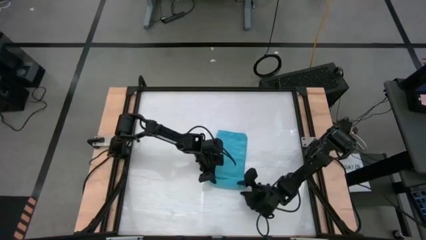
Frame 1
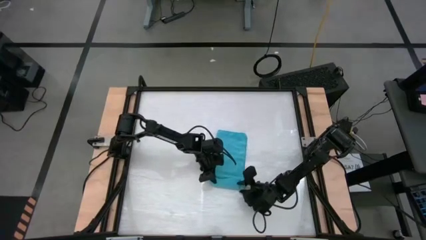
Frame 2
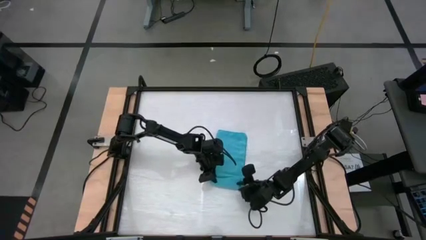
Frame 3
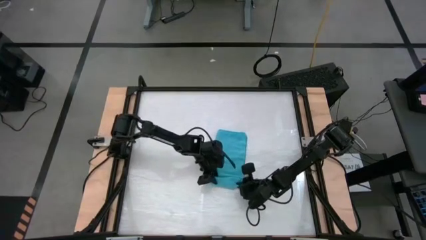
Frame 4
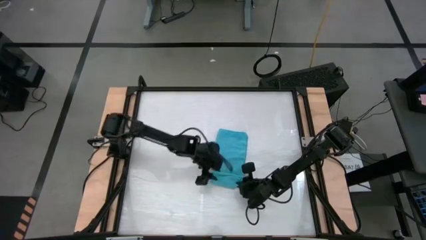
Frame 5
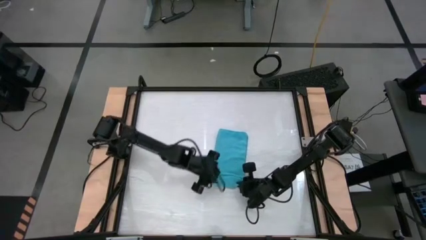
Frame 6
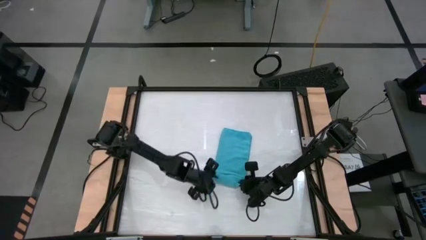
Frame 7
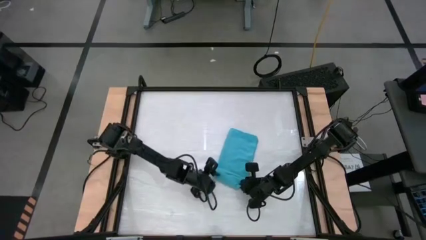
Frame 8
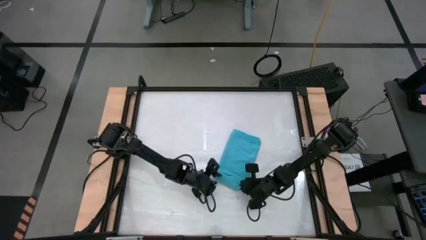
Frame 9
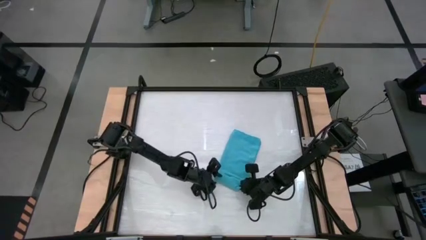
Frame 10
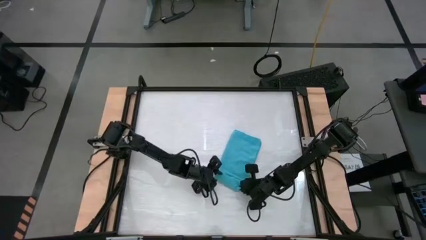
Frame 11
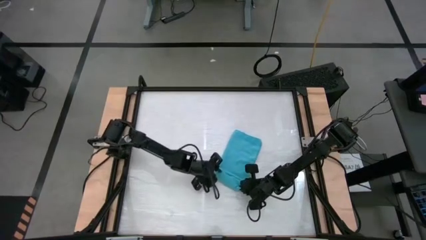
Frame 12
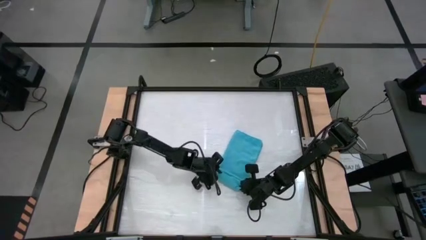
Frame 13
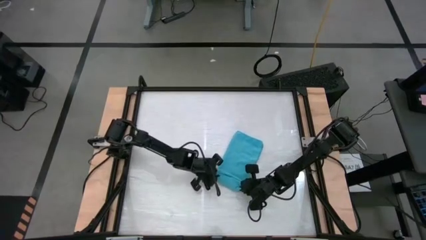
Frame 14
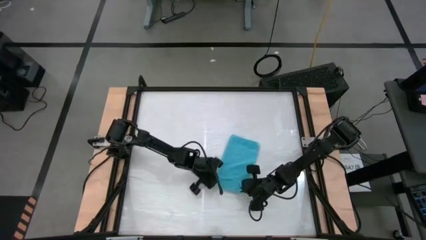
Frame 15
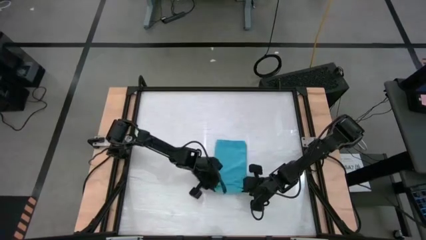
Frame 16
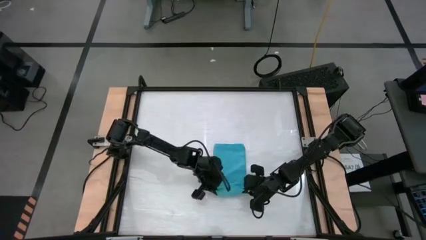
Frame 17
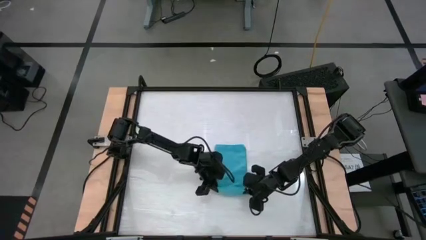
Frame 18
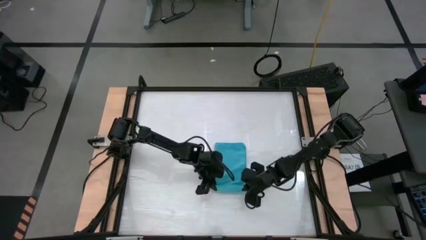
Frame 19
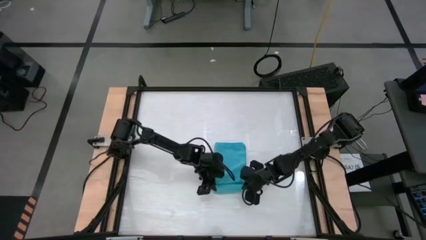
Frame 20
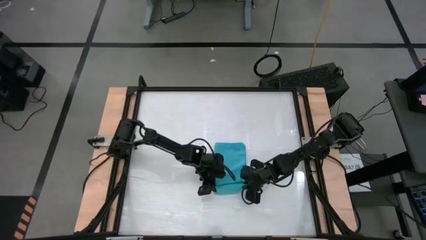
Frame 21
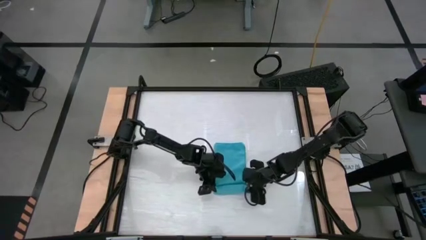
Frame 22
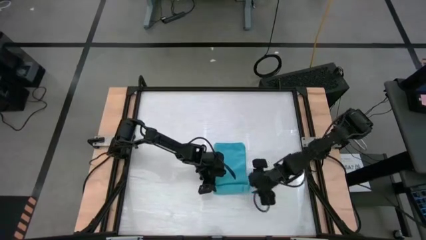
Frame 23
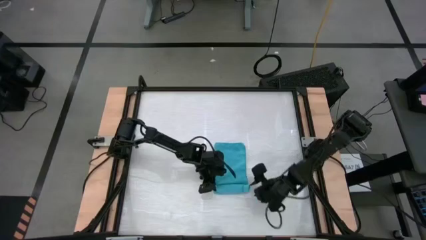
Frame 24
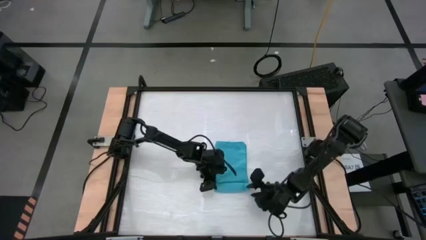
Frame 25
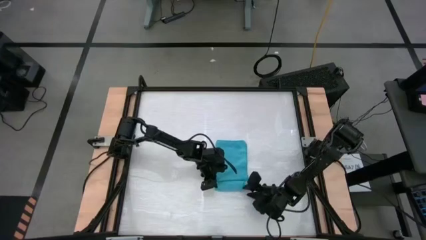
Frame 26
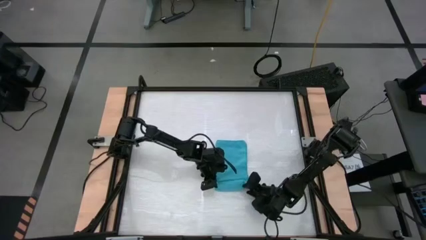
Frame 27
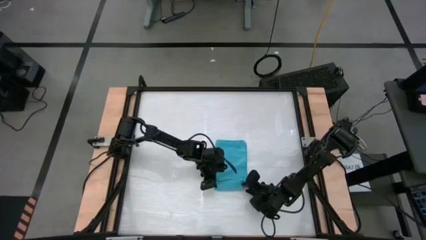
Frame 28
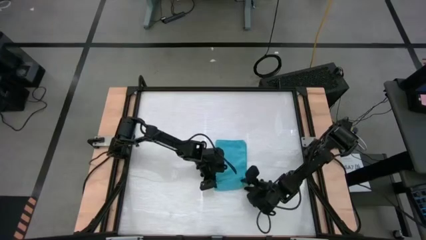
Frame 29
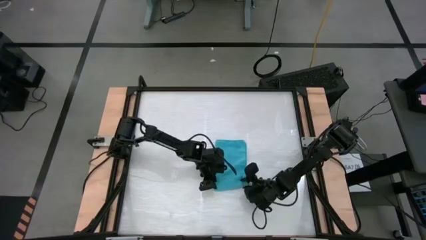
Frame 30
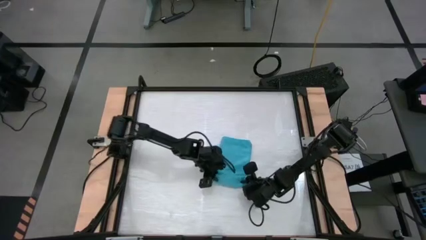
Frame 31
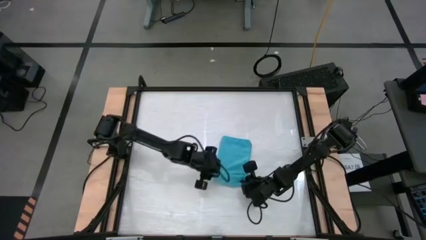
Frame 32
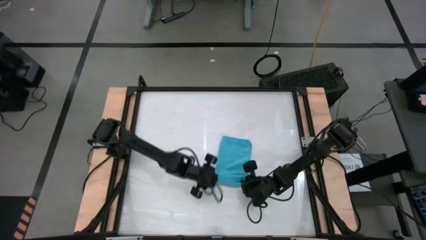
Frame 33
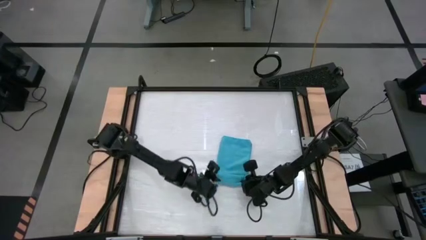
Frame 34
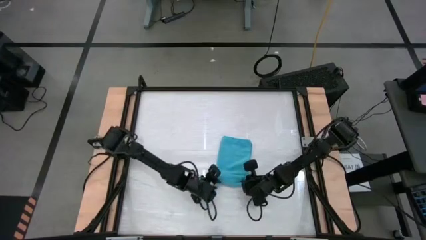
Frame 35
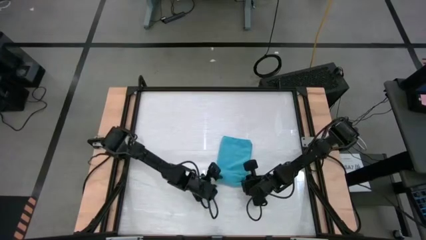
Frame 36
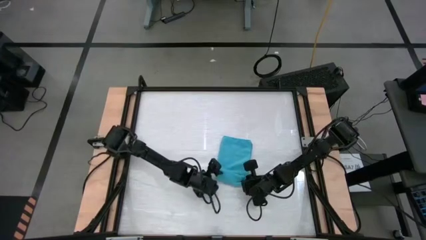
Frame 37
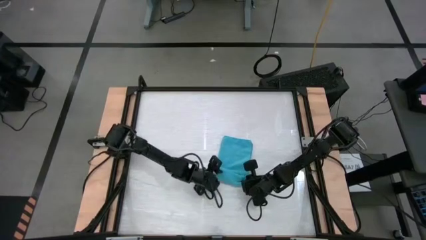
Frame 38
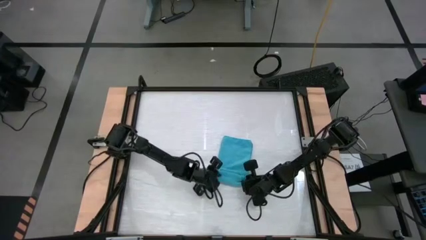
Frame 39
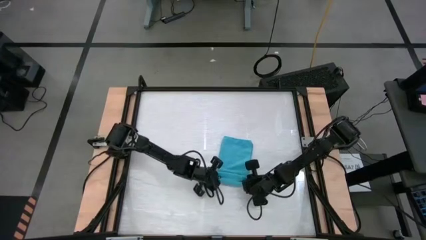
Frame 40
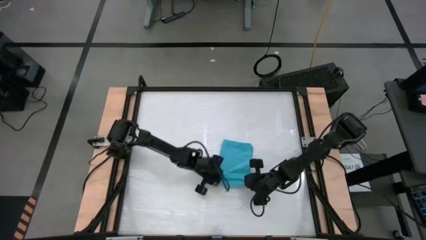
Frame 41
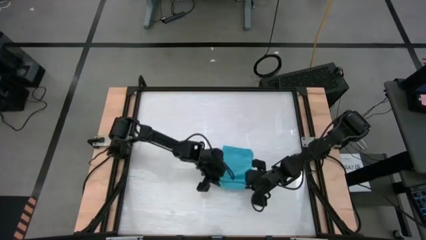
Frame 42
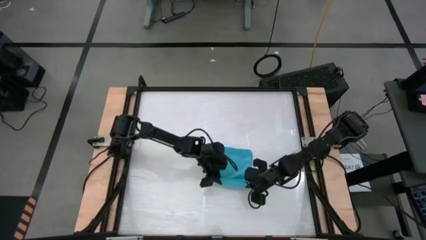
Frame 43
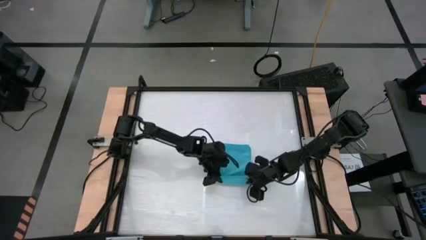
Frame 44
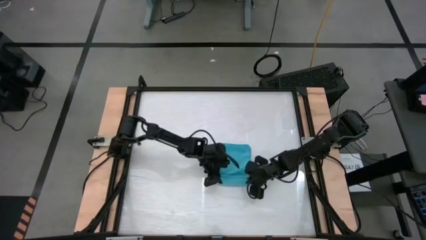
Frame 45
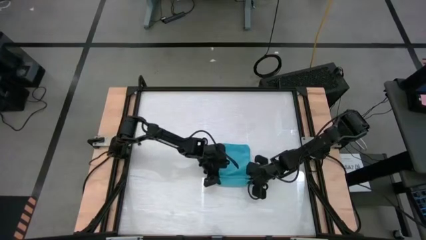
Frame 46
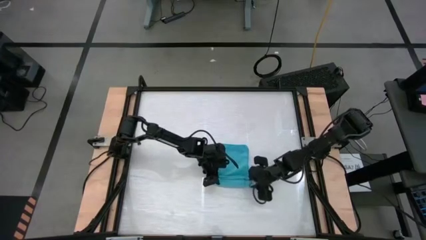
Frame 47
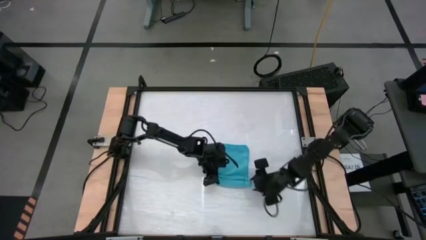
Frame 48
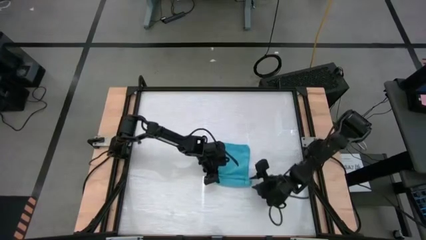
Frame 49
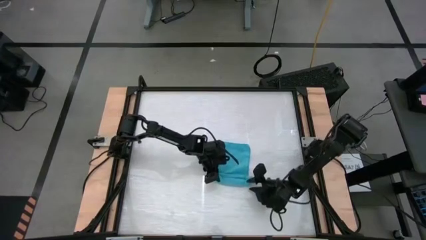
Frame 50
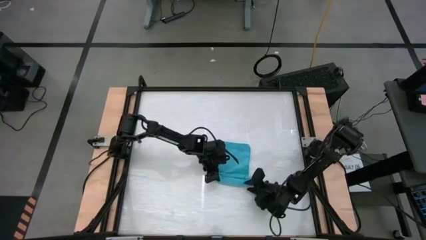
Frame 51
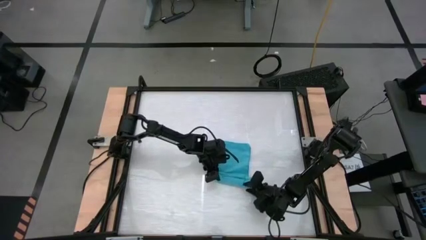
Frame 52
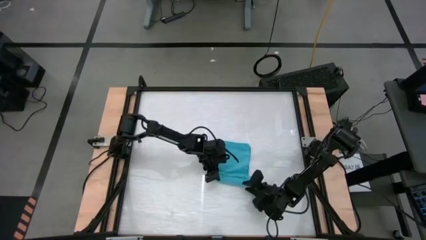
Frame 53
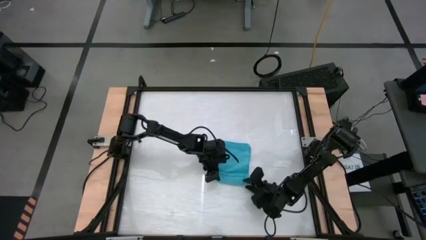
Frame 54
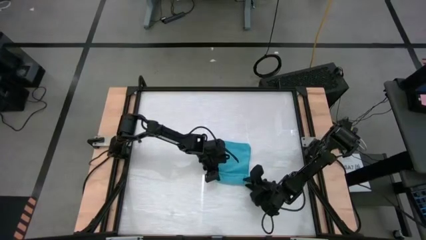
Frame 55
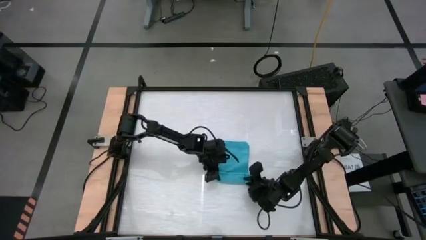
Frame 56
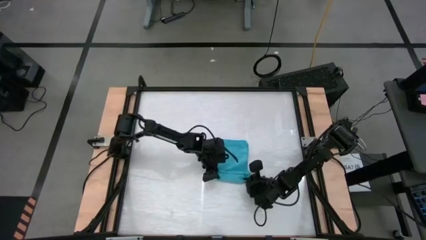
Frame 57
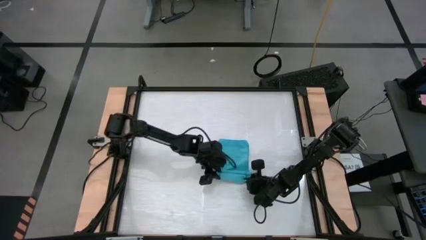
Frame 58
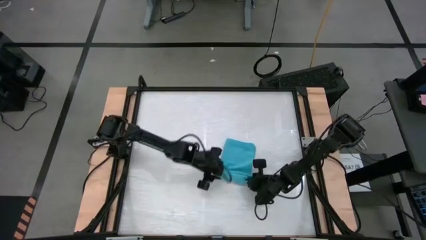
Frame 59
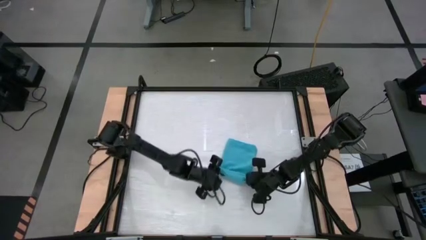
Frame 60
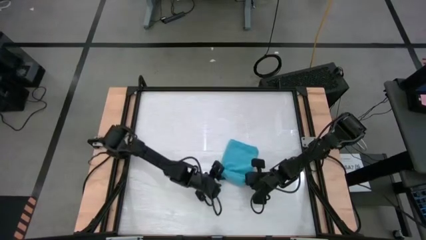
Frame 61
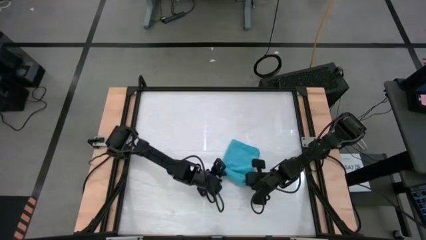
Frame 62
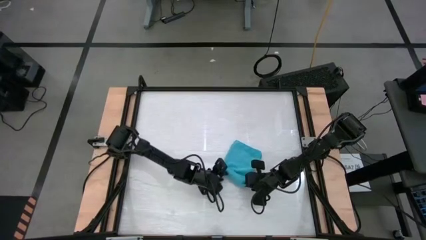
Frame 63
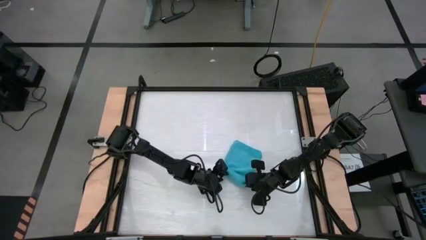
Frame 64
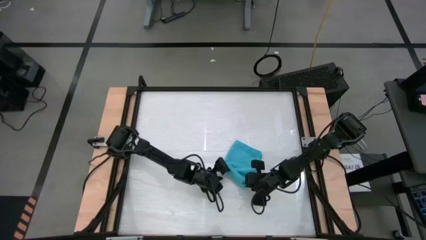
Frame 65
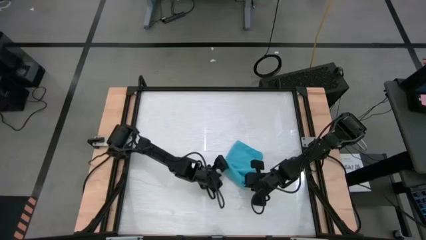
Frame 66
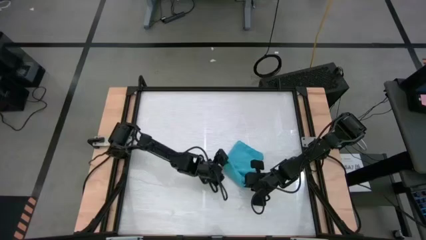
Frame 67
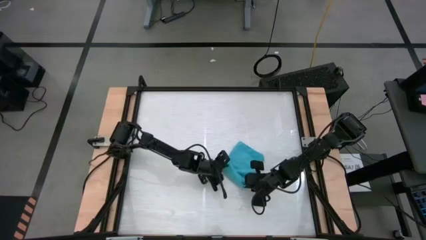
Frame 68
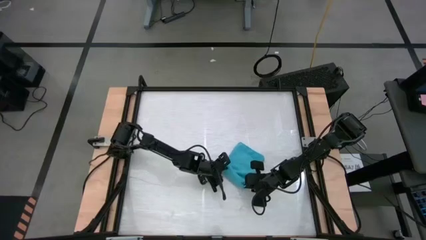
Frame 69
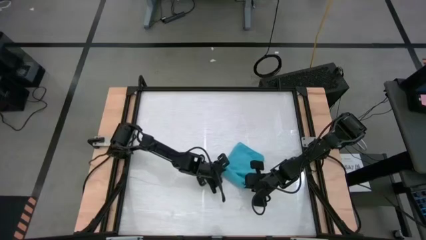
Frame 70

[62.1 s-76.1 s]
Task: Roll towel
Roll the blue towel

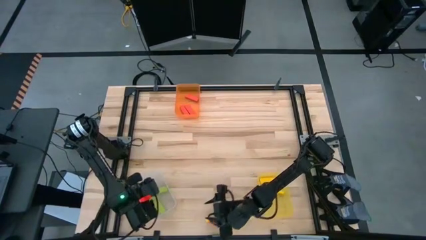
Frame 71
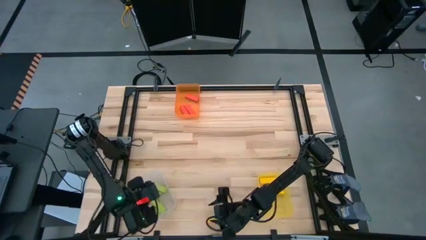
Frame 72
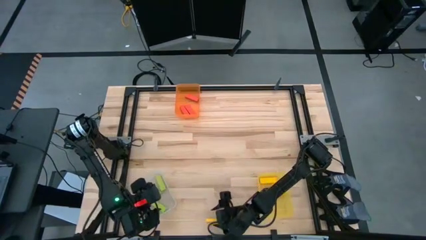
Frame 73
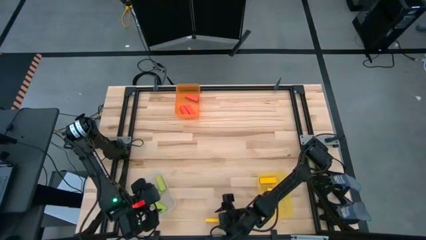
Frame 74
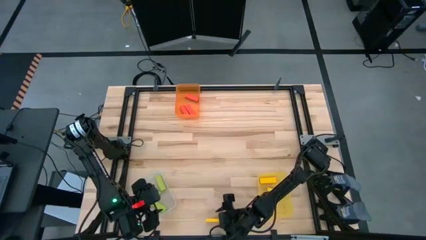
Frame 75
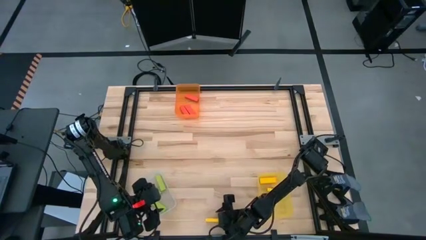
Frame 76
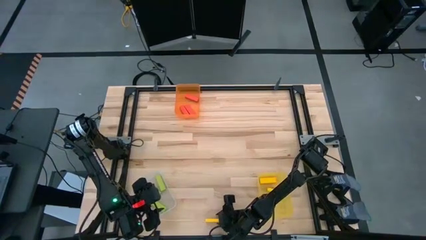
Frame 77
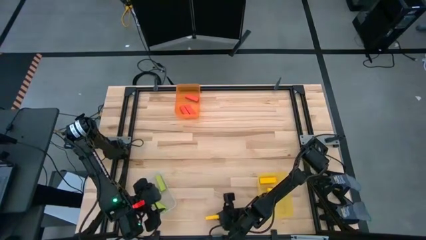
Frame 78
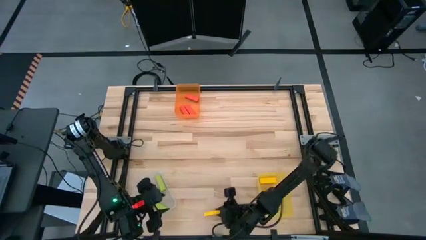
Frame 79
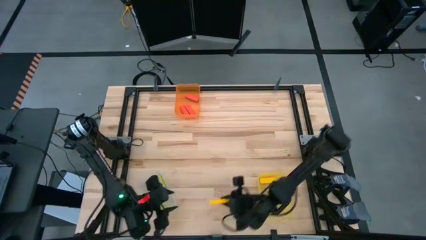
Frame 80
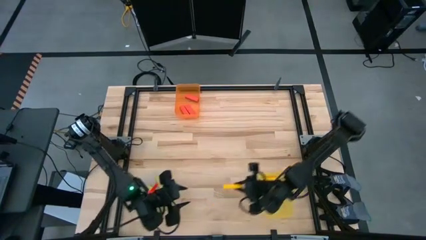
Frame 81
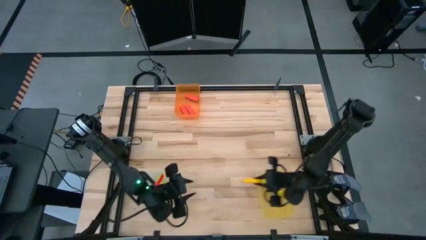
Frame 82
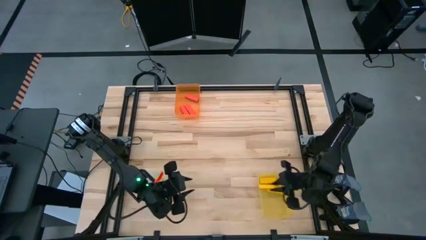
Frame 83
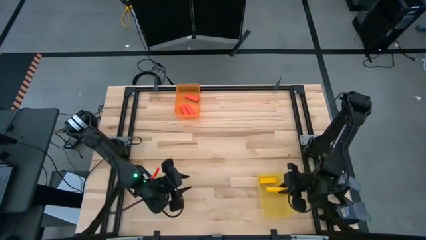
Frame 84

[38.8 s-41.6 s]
Task: Sort blocks
Put the yellow block into the yellow bin
